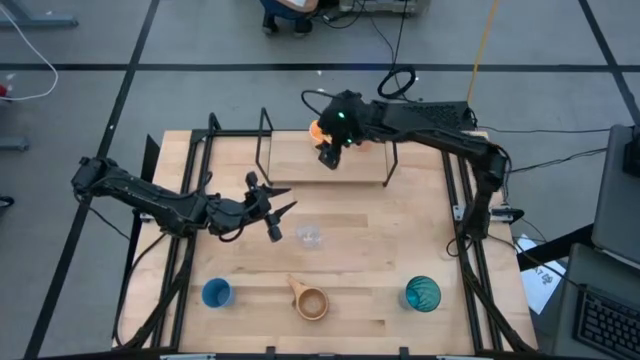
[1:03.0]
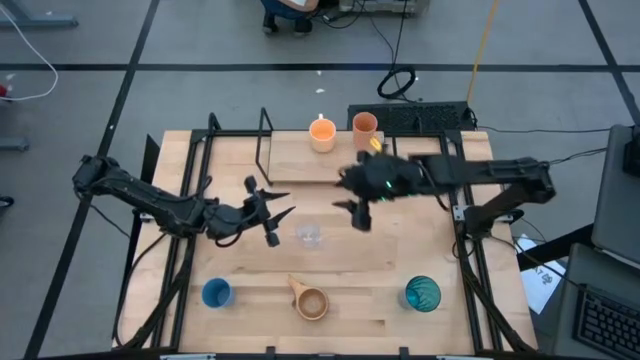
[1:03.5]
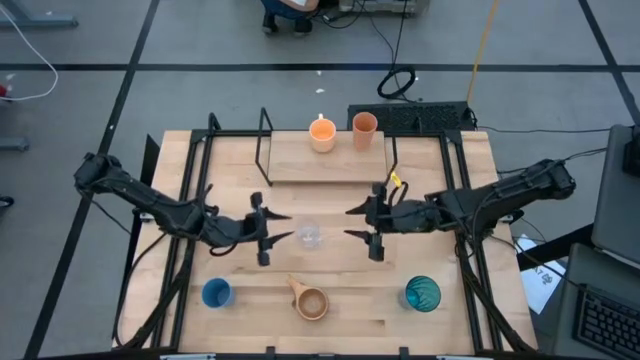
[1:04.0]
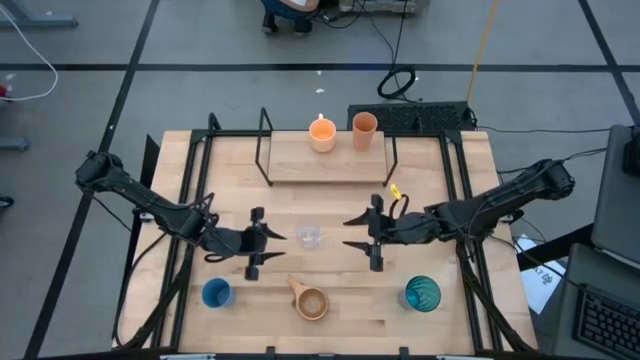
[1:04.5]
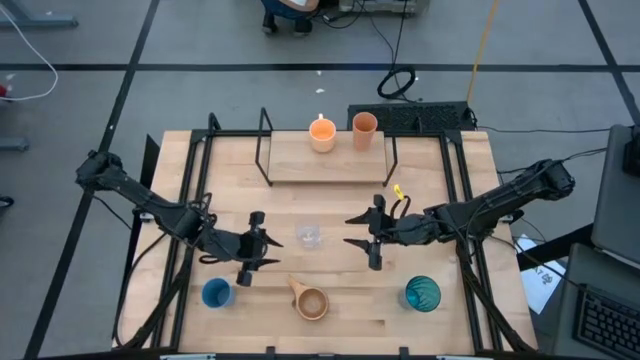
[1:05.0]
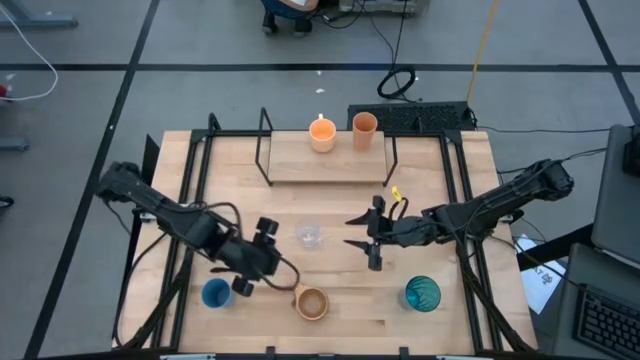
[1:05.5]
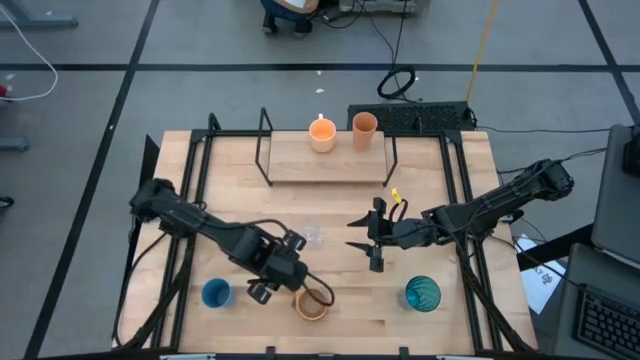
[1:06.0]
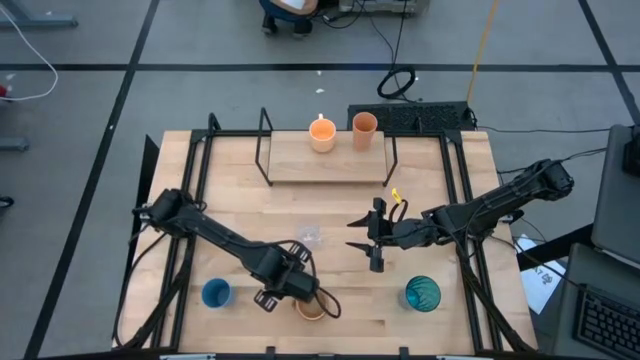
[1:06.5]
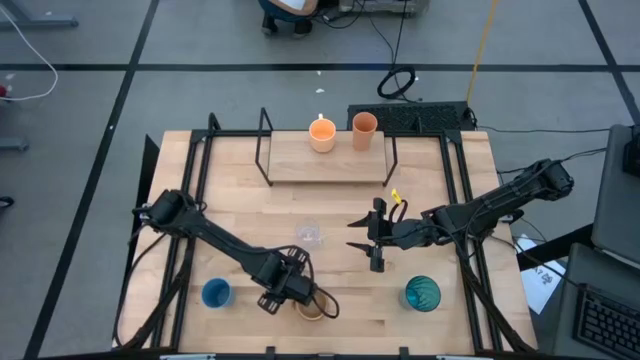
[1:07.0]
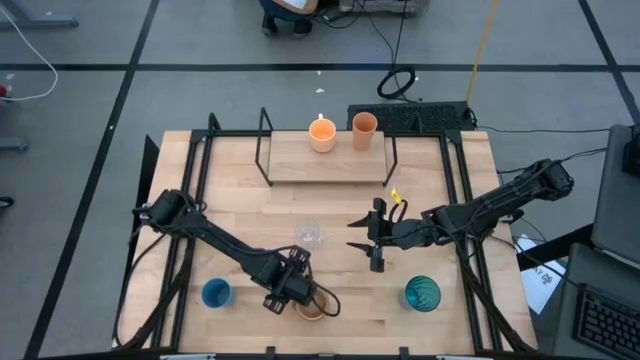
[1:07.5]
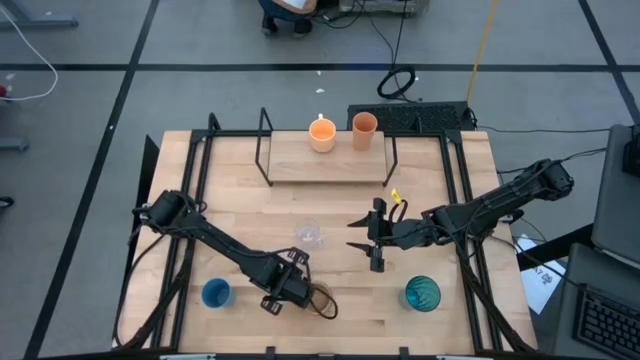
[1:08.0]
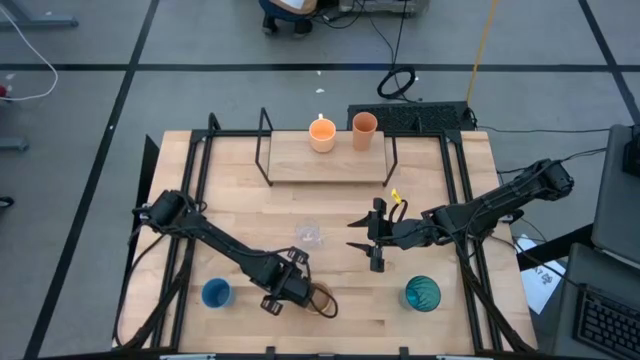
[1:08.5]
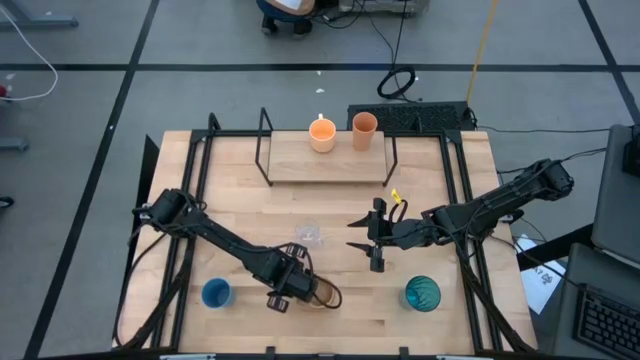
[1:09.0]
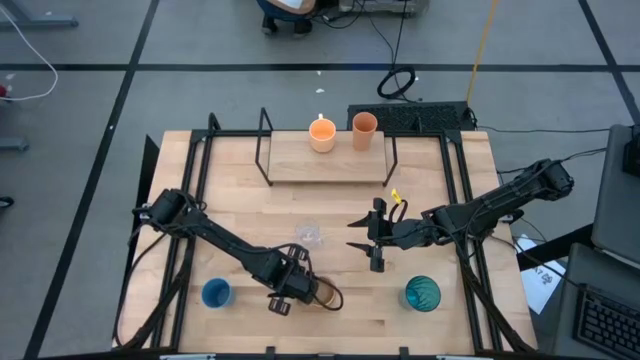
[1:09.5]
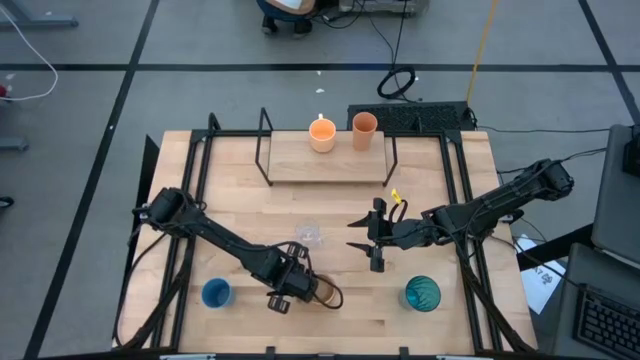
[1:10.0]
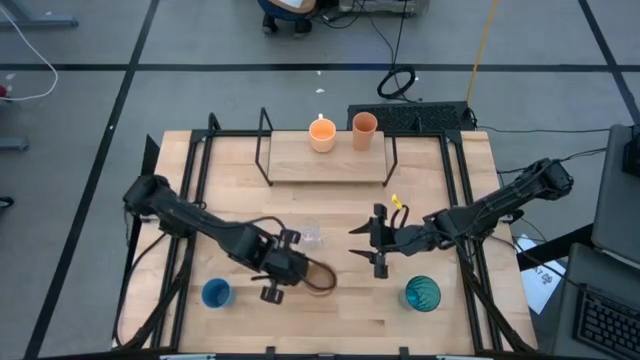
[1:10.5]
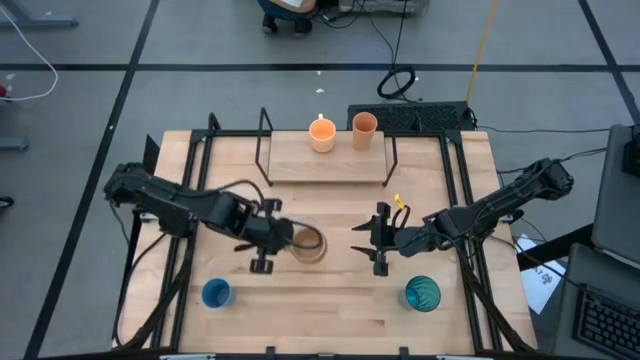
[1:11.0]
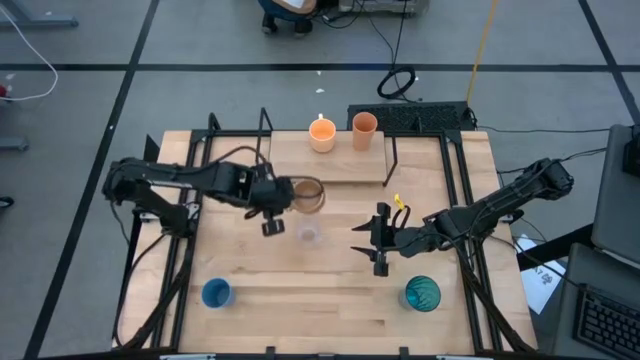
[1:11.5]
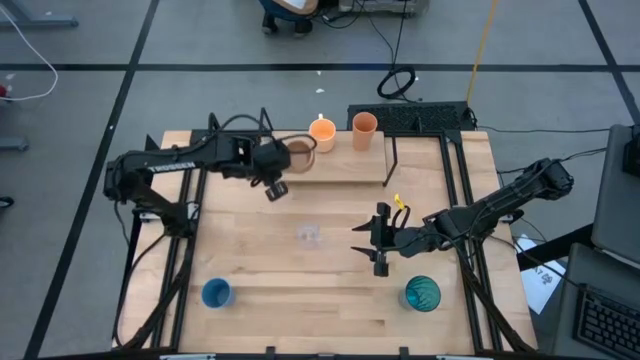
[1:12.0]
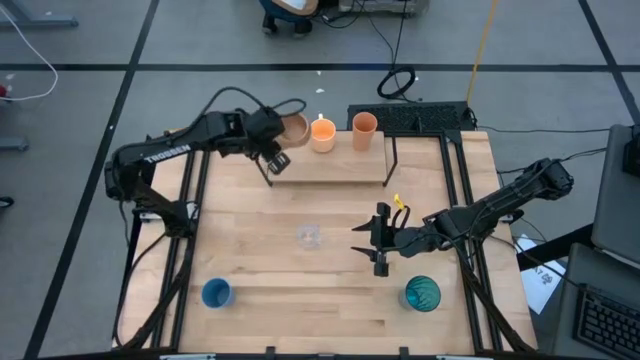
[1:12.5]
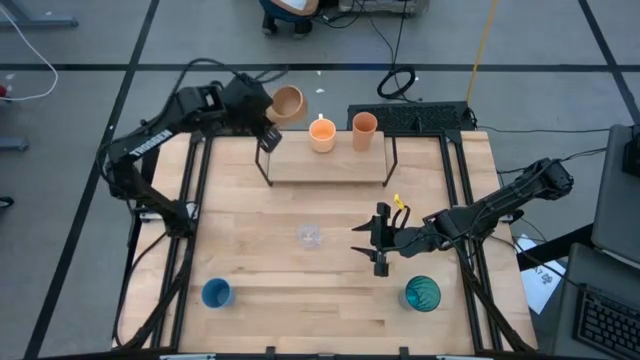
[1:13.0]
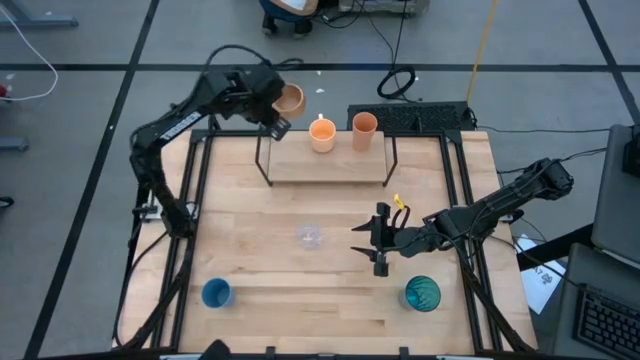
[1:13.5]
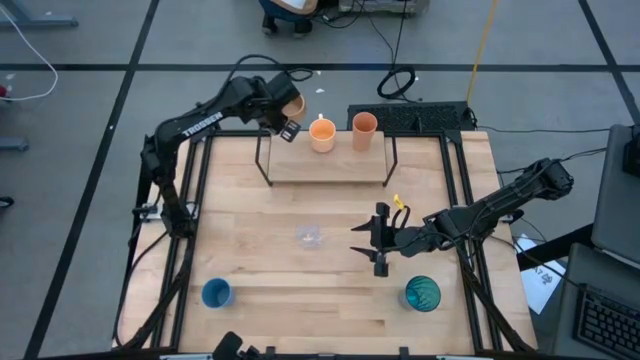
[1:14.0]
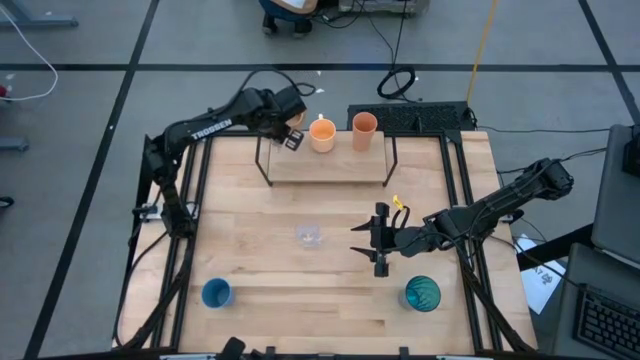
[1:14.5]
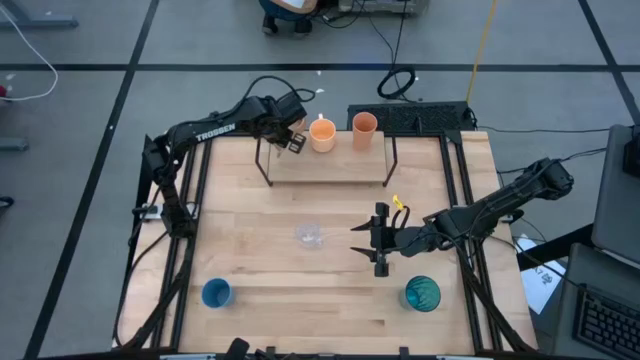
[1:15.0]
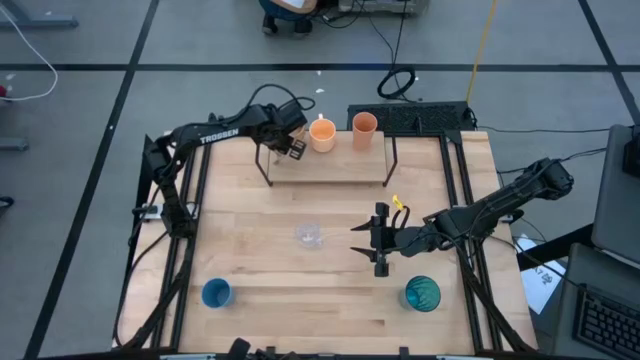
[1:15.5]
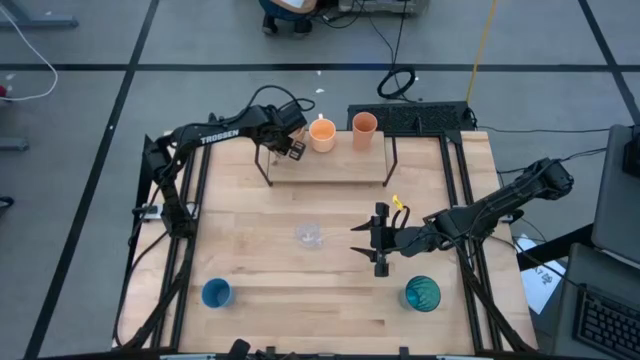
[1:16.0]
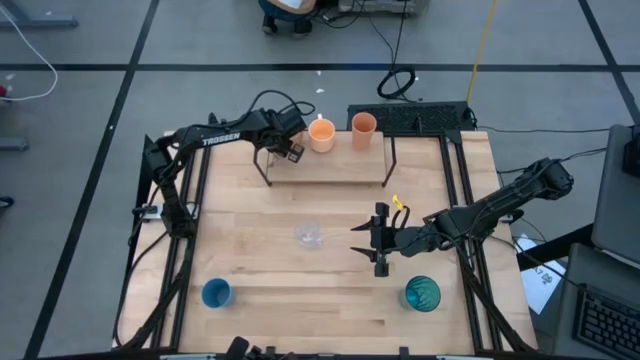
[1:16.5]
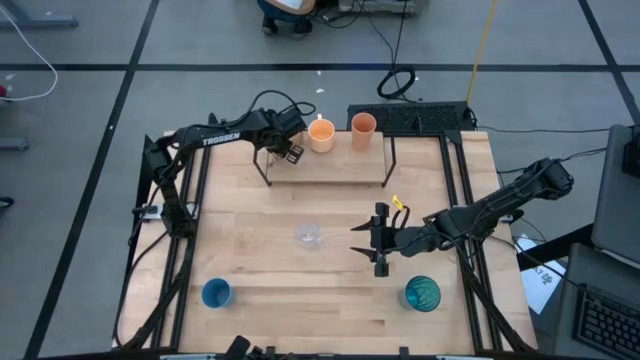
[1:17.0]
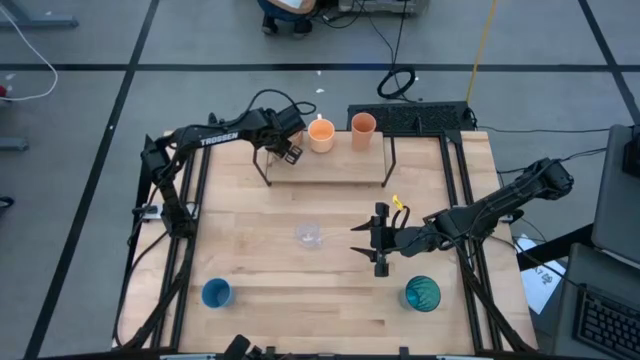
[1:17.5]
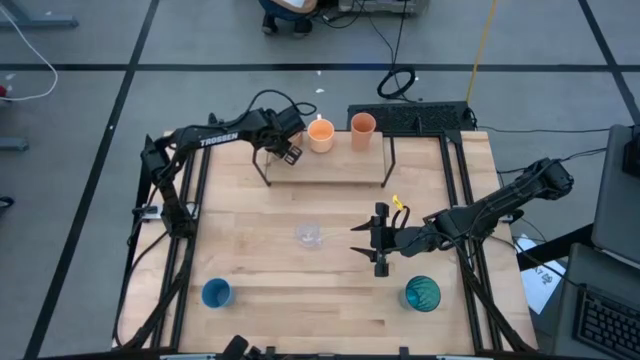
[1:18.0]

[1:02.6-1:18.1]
Task: Stack small to large cups/mugs on shelf
Put the brown mug on the shelf

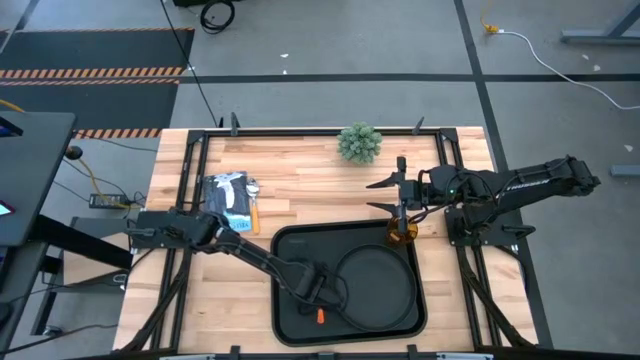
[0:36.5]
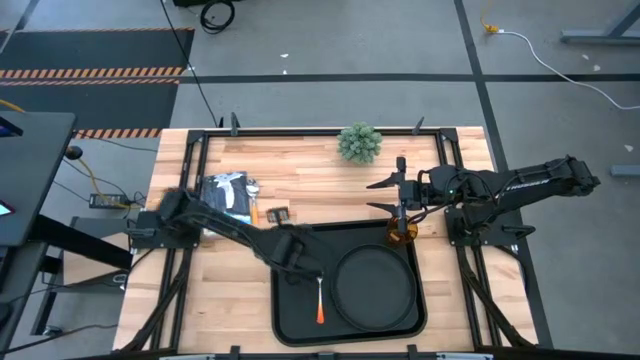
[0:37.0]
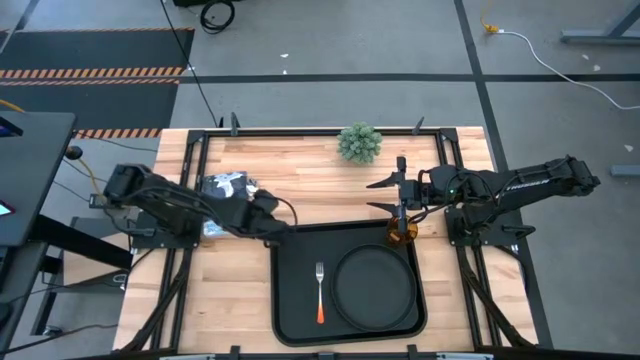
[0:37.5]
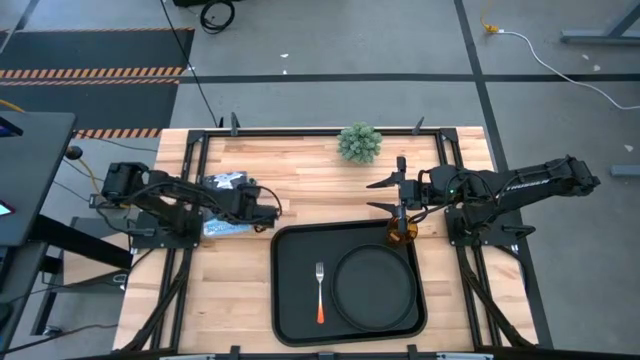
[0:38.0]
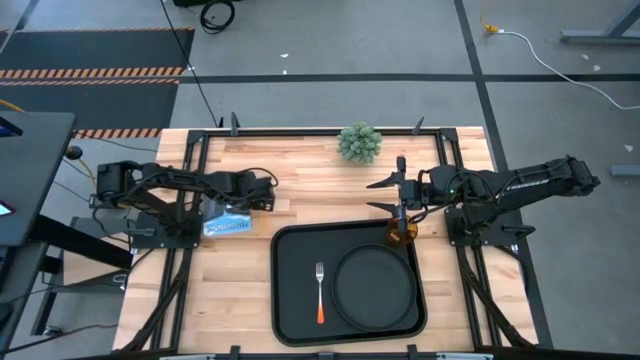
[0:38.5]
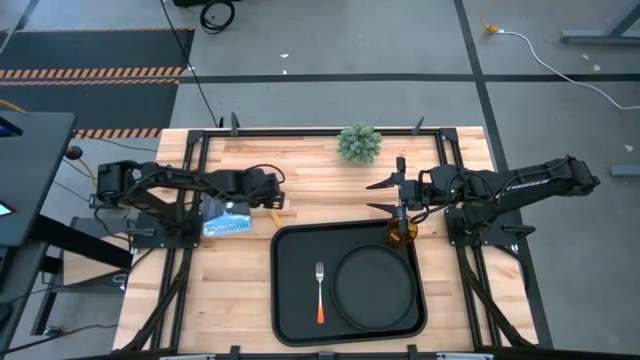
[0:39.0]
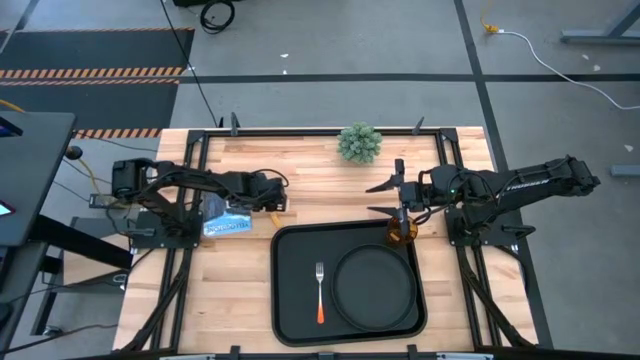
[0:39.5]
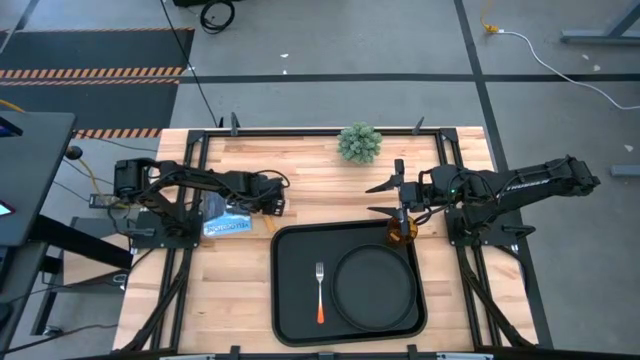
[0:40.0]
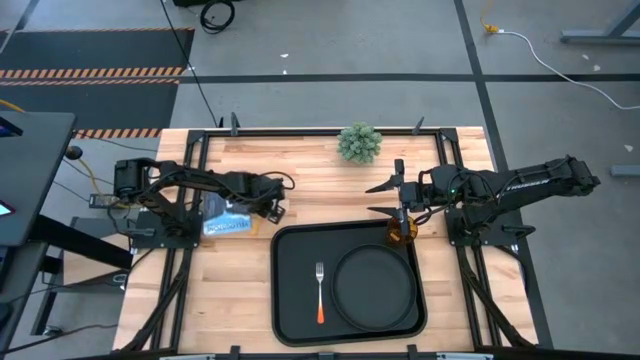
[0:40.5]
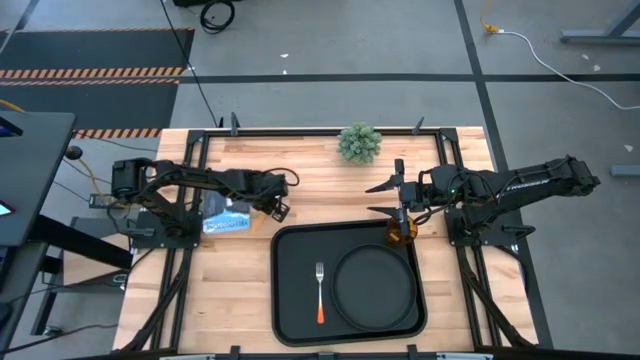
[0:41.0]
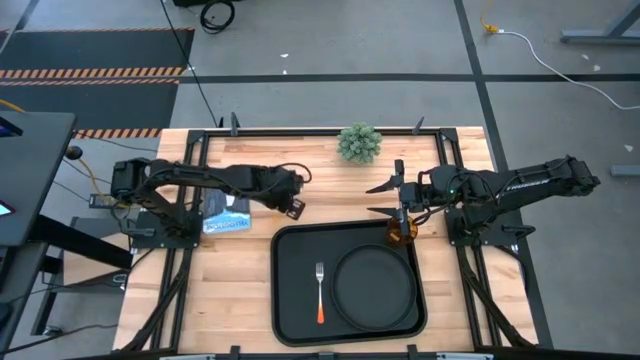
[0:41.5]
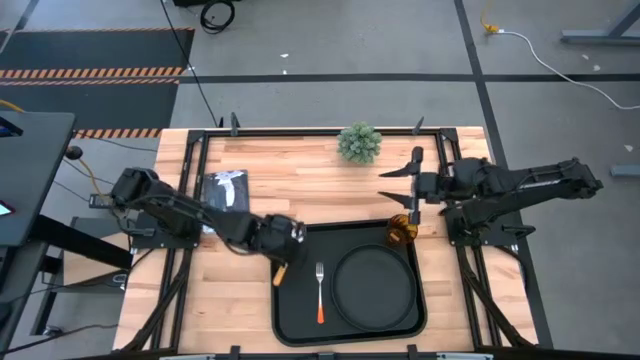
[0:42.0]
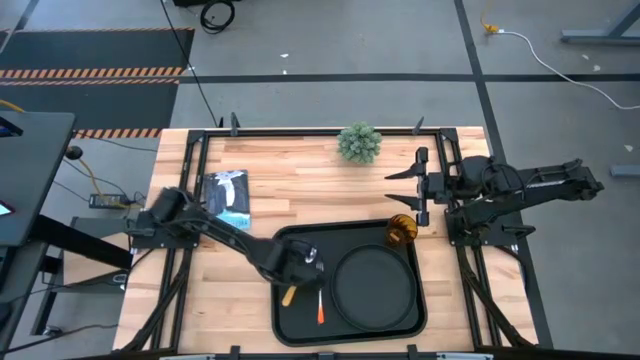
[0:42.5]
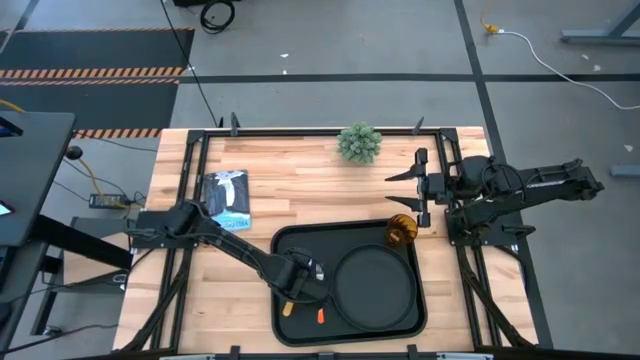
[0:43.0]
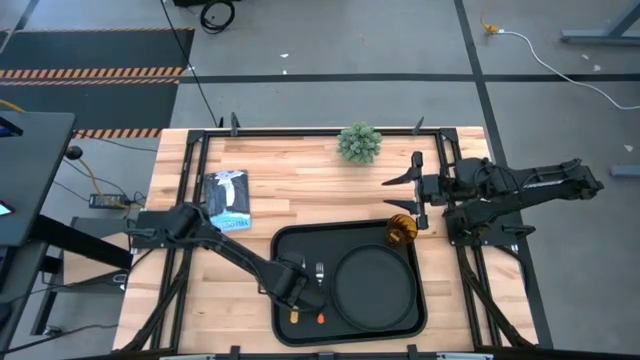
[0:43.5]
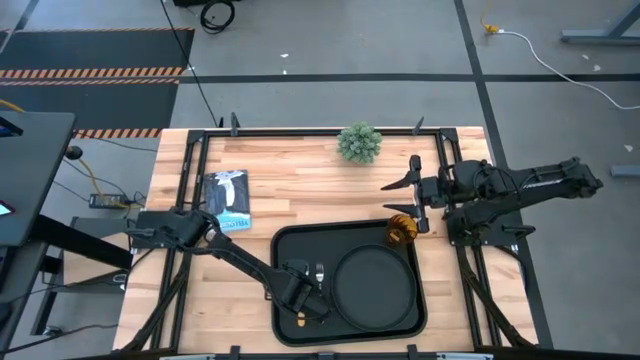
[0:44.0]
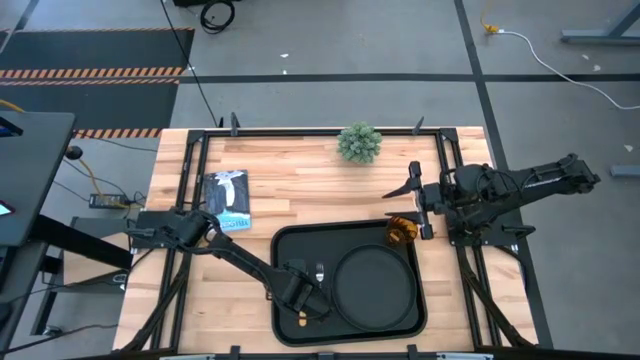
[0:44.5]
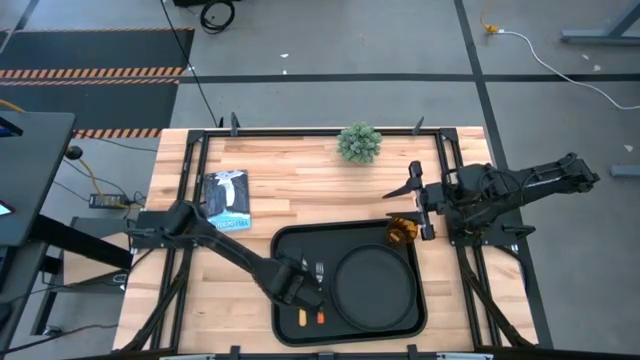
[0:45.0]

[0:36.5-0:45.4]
Task: Pick and place plate/cup/fork/spoon on tray
Put the yellow spoon on the black serving tray to the left of the orange fork
